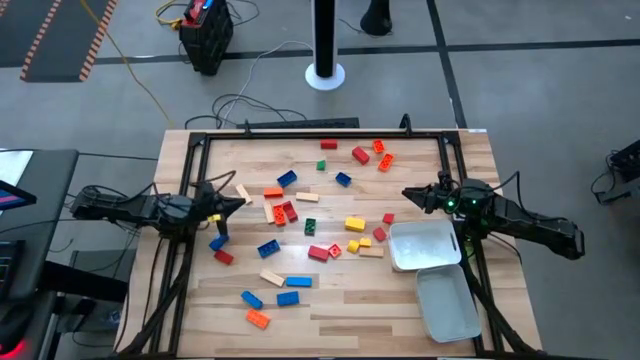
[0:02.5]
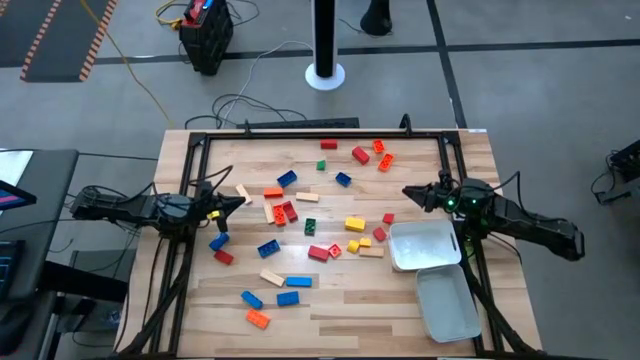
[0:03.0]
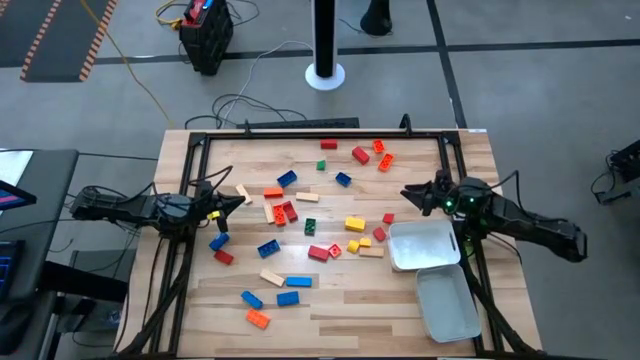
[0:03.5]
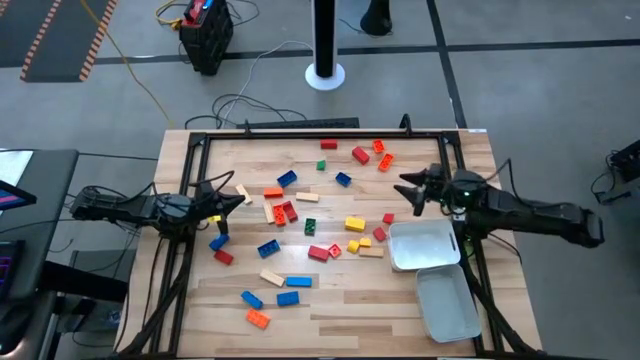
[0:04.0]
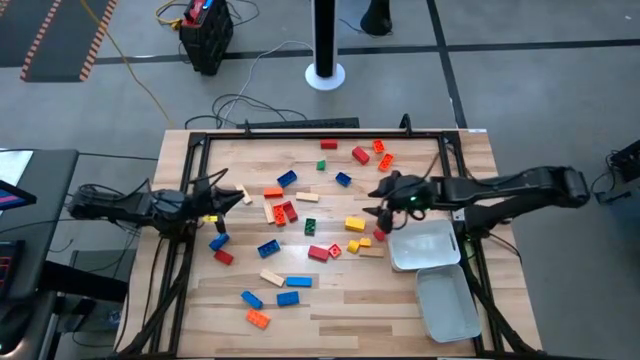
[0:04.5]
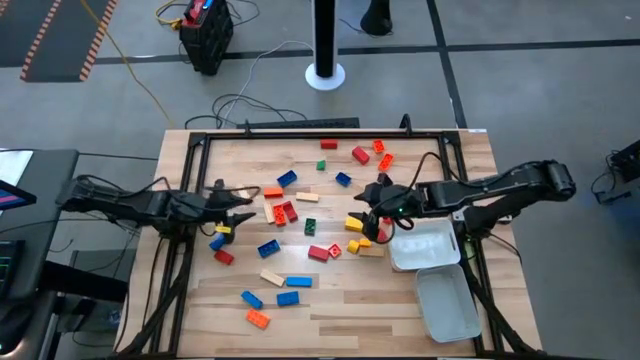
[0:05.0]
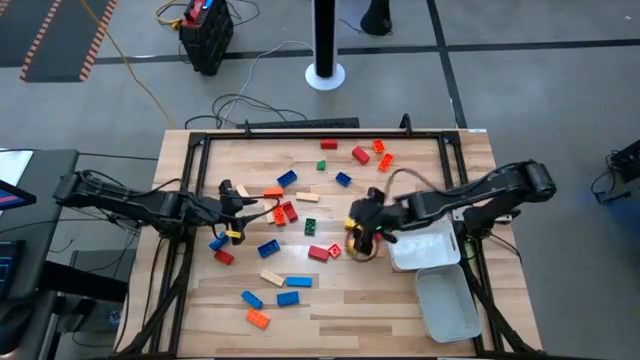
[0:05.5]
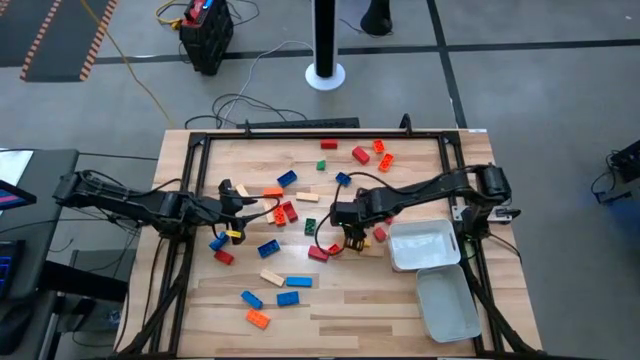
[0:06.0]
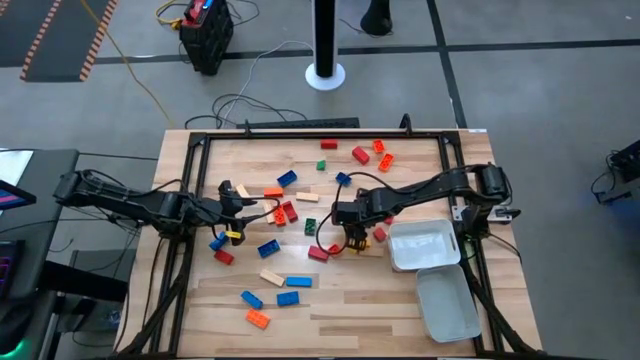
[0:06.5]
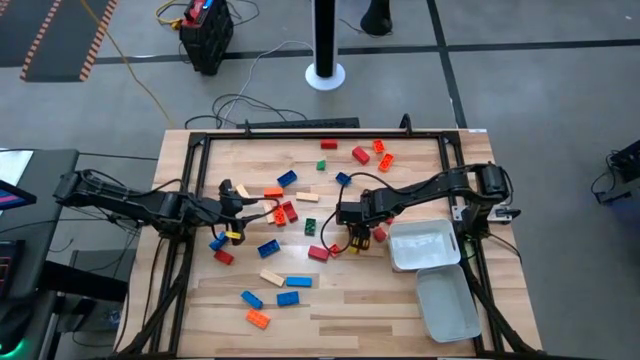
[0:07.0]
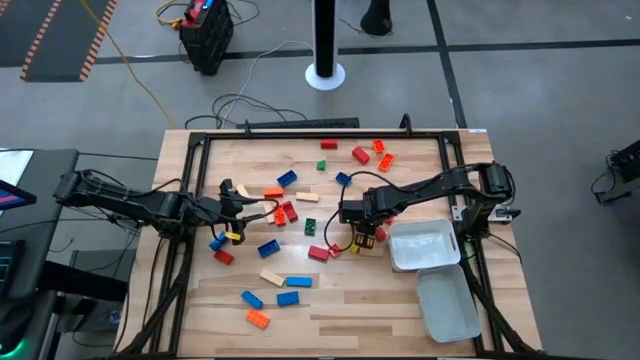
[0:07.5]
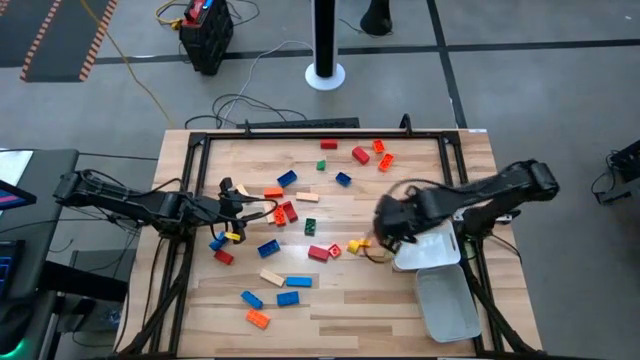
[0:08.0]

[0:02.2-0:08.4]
Task: Sort blocks by size
Put the yellow block into the white bin

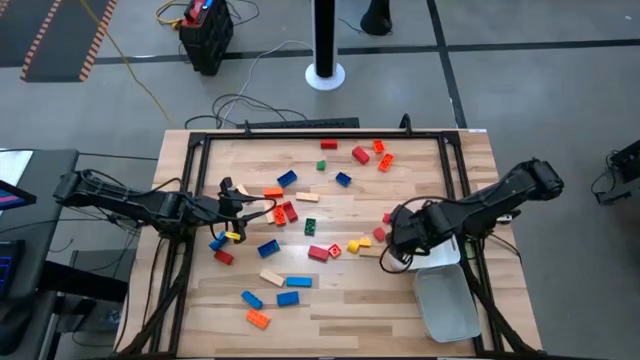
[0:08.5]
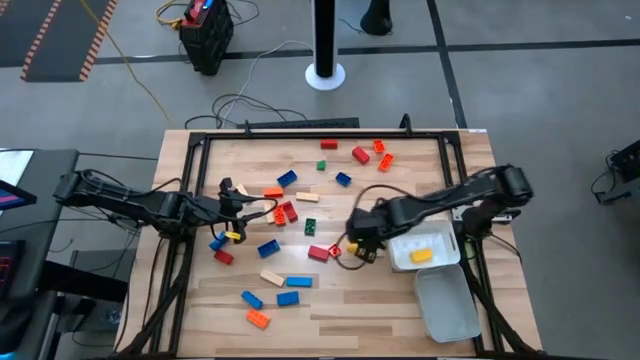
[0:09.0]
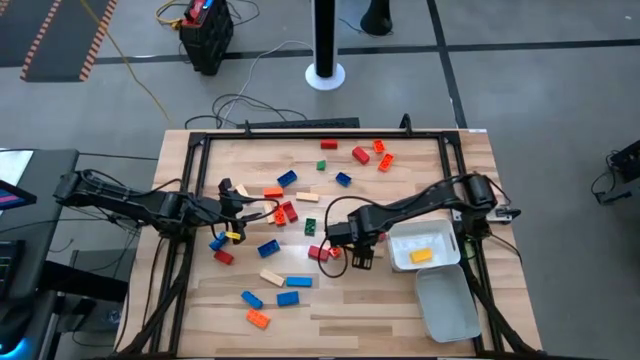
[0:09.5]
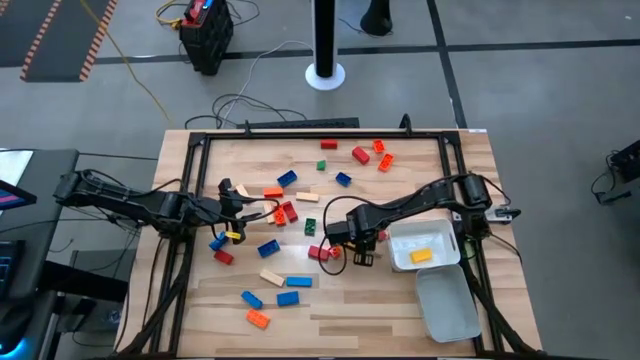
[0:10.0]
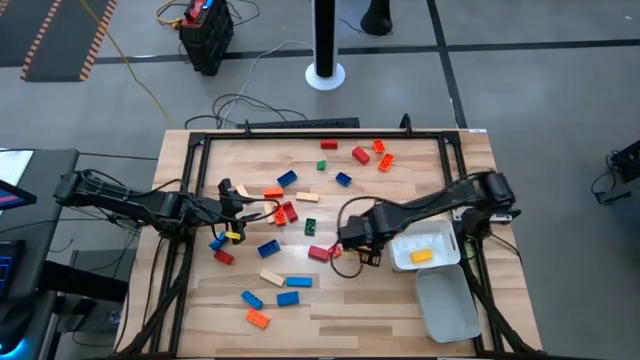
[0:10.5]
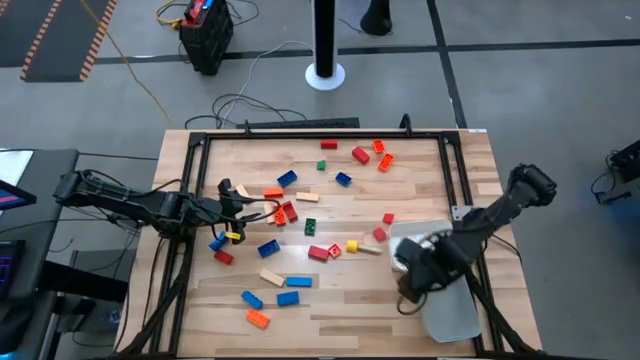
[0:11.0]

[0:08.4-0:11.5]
Put the 4 stud yellow game piece into the gray bin

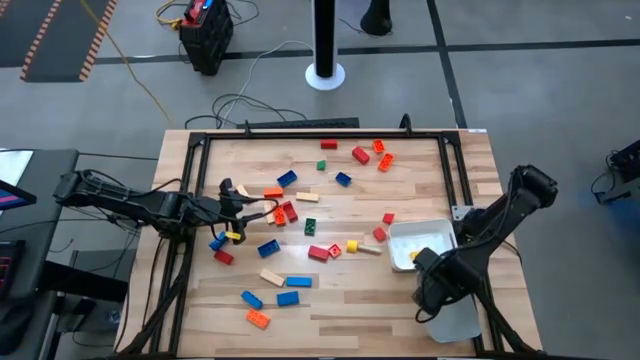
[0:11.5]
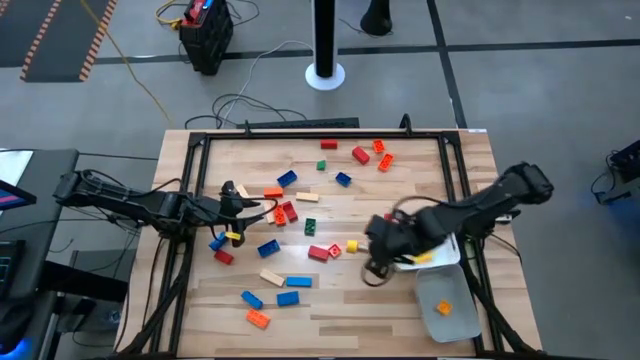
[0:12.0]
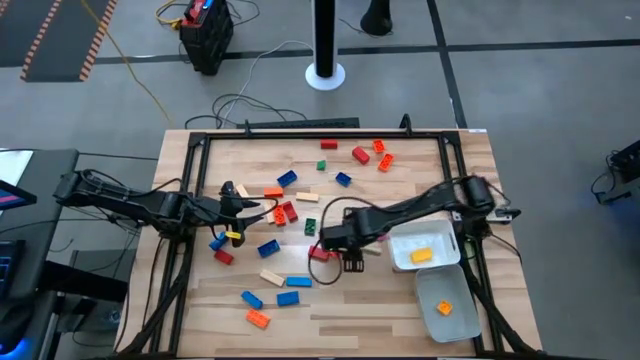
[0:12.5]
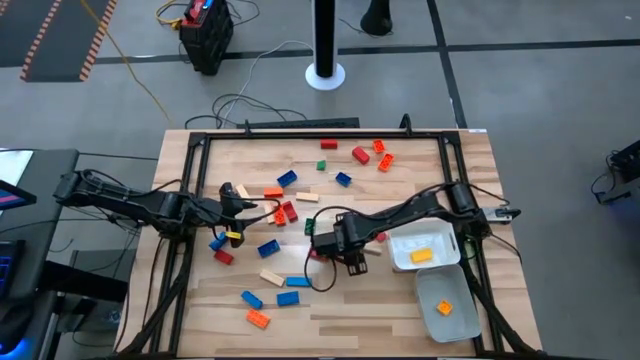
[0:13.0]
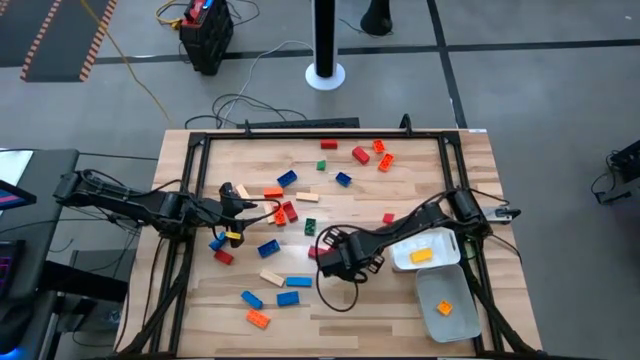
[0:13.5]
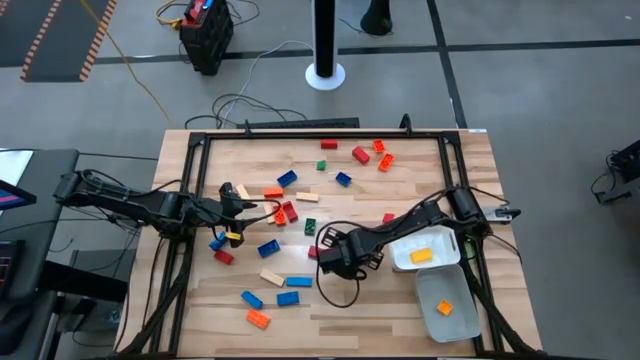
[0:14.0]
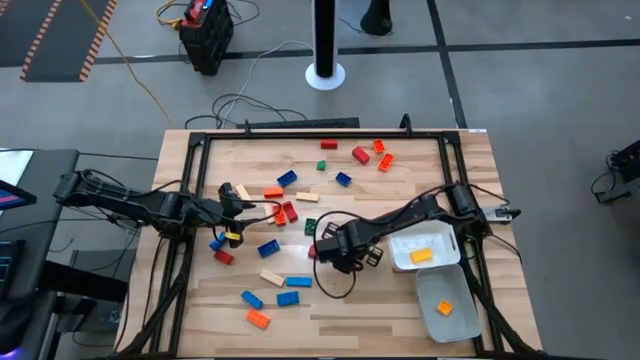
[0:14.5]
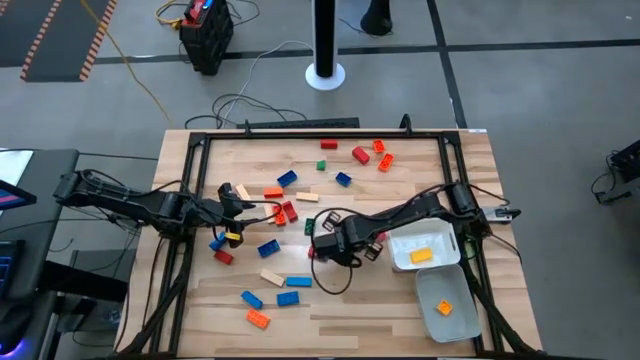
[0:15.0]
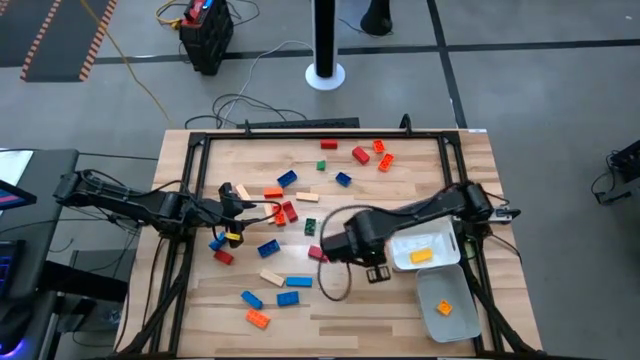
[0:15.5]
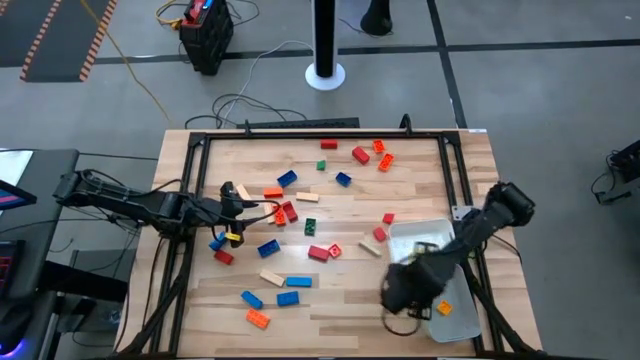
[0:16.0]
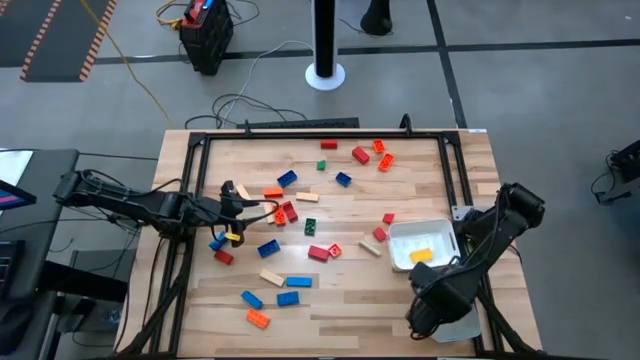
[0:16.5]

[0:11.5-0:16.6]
Put the half circle yellow block into the gray bin

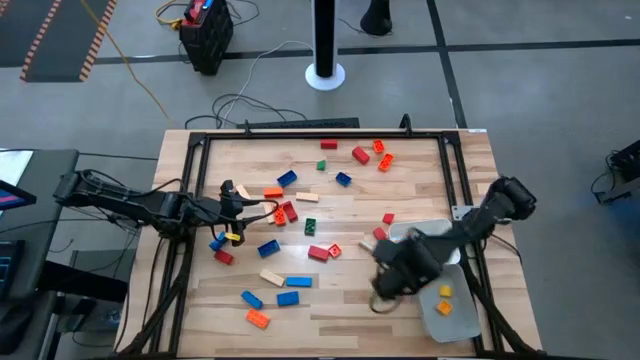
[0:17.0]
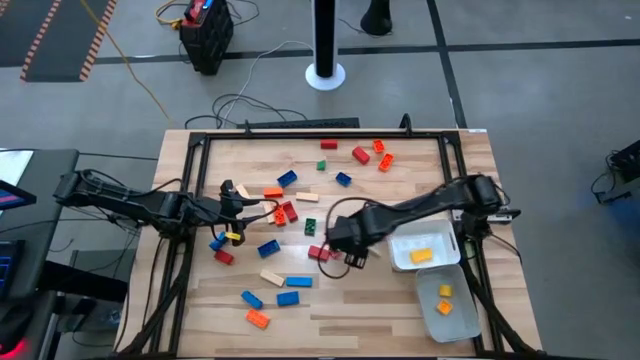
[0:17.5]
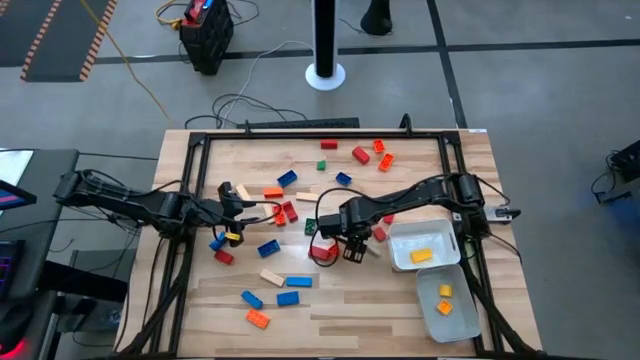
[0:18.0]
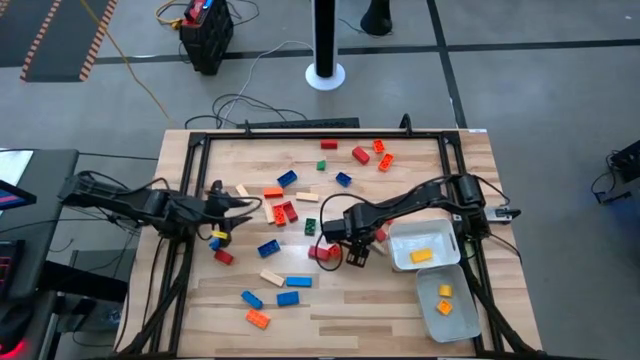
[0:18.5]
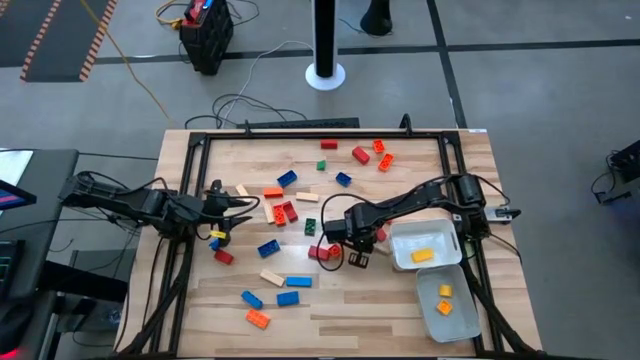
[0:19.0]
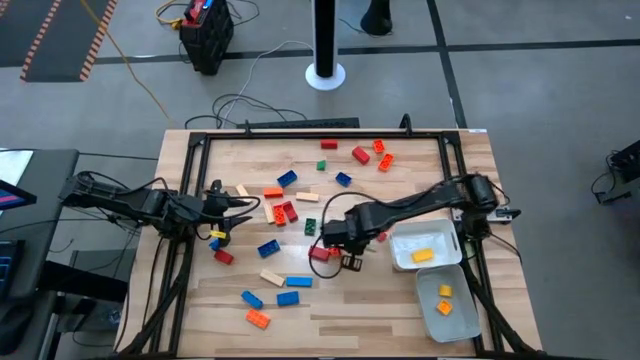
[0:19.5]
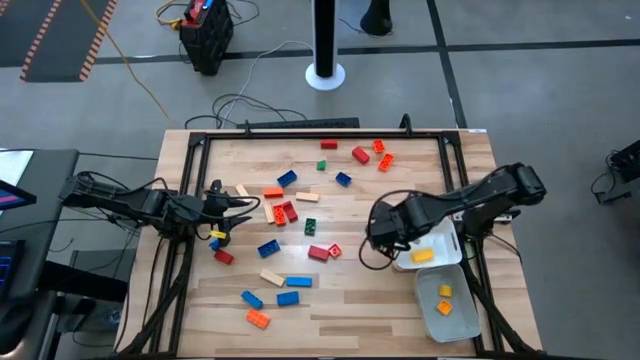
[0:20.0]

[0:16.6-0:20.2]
Put the wooden block into the white bin

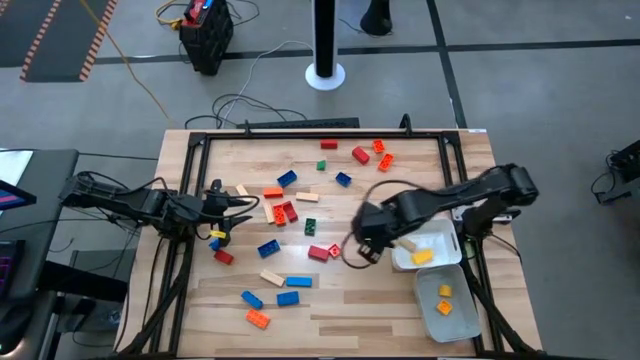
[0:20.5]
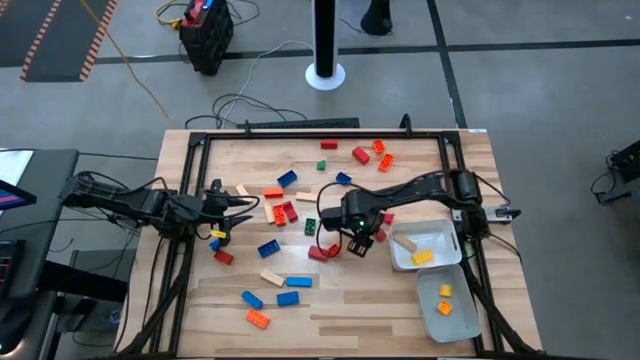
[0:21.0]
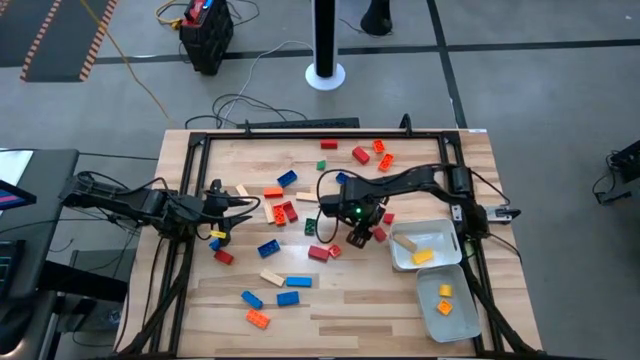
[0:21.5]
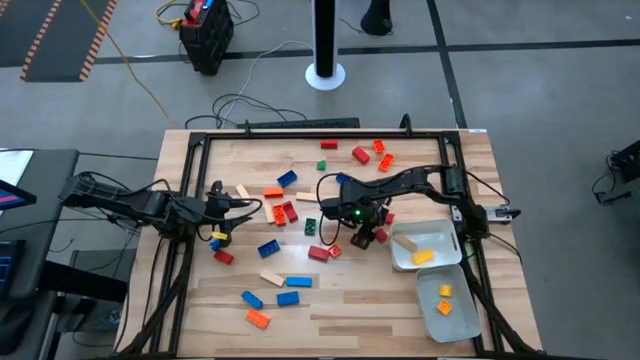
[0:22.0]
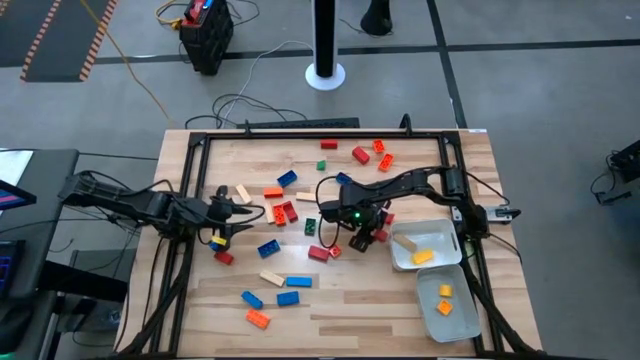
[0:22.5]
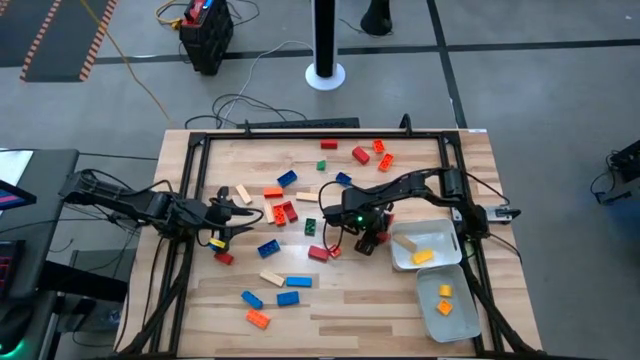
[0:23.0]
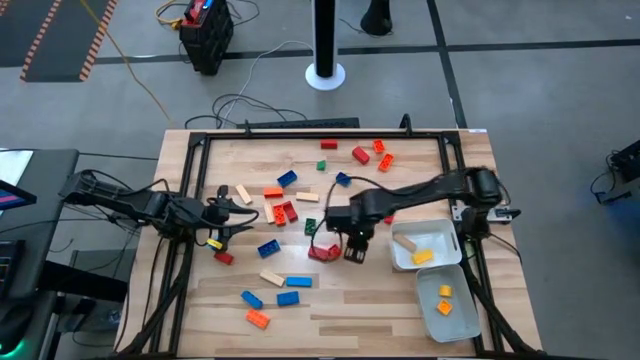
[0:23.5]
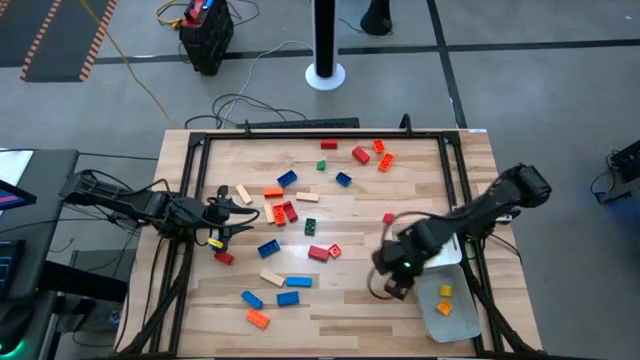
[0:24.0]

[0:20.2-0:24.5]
Put the half circle red block into the gray bin
